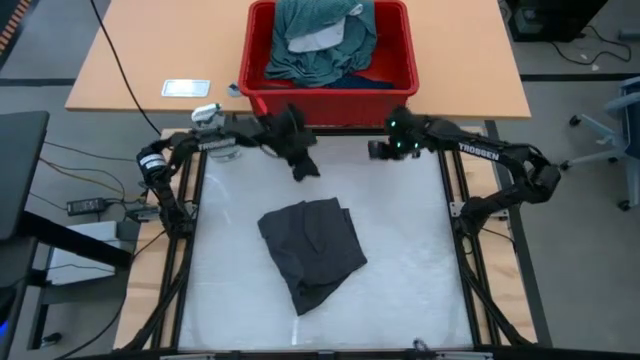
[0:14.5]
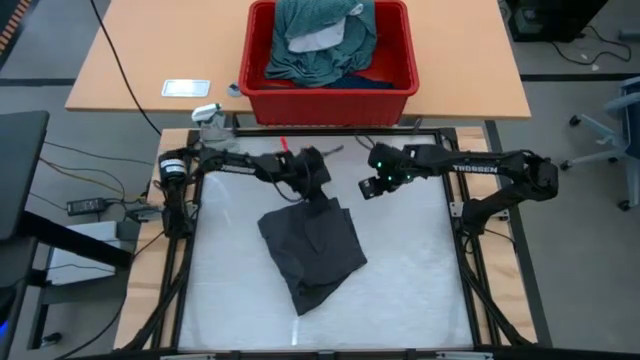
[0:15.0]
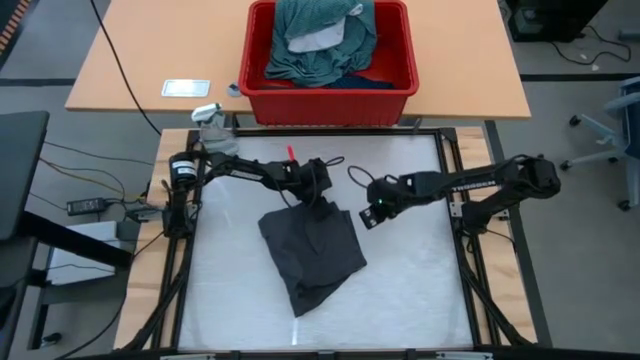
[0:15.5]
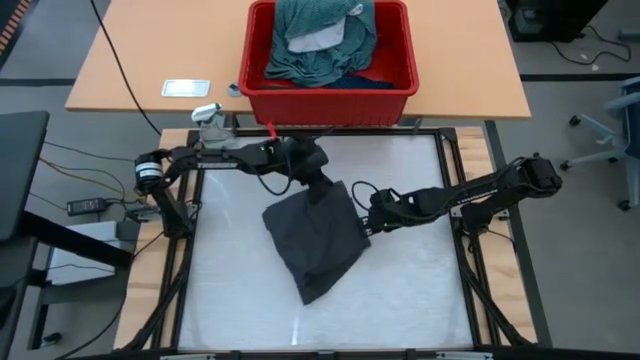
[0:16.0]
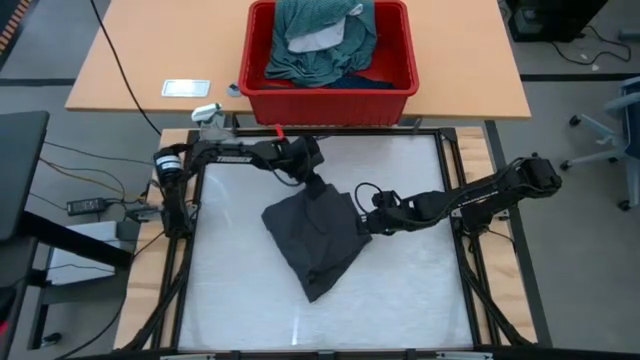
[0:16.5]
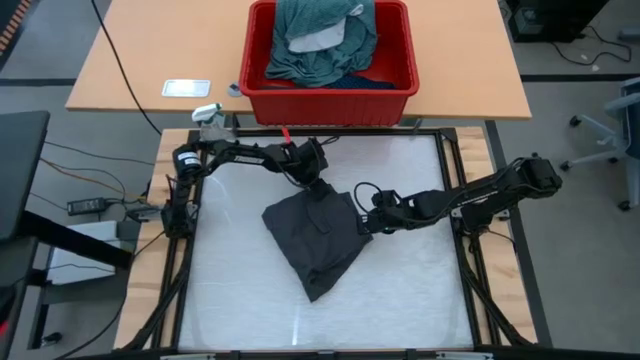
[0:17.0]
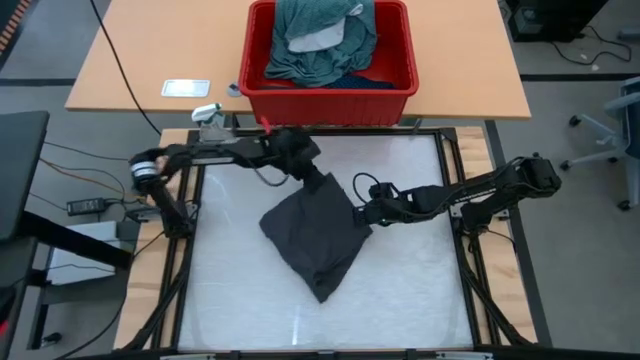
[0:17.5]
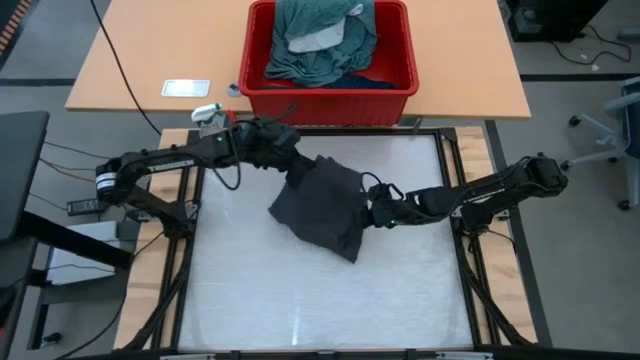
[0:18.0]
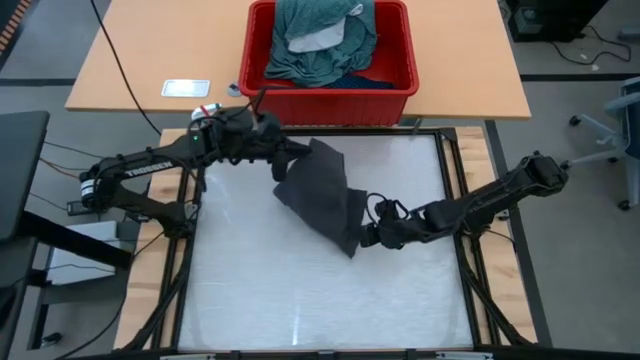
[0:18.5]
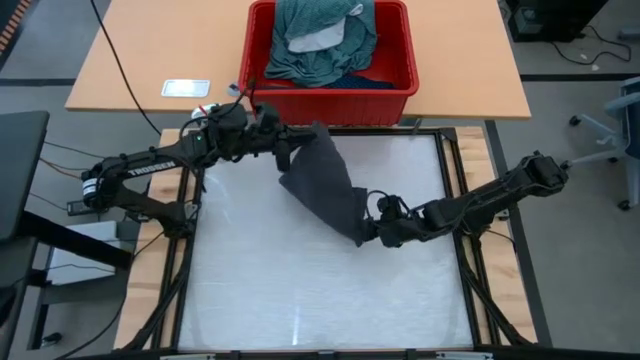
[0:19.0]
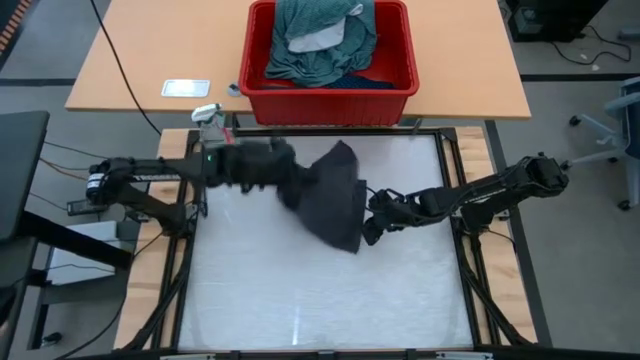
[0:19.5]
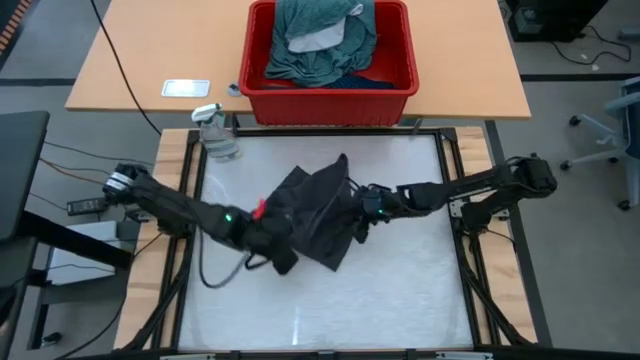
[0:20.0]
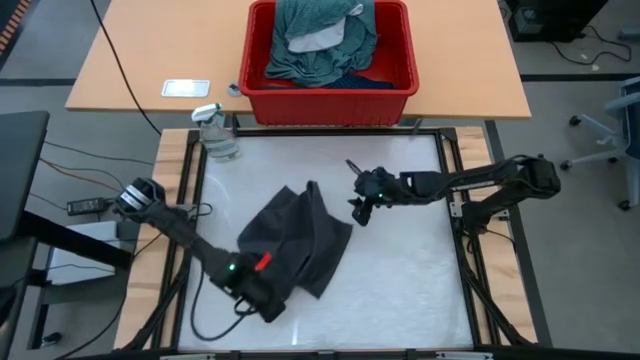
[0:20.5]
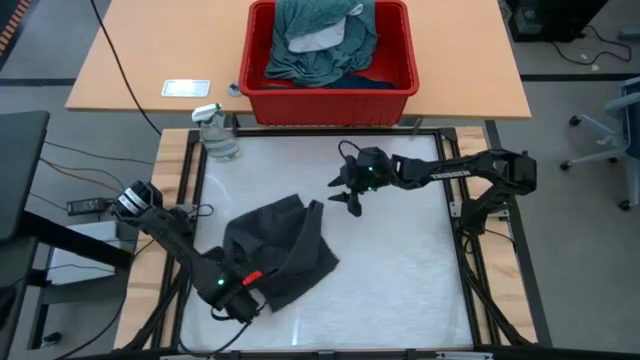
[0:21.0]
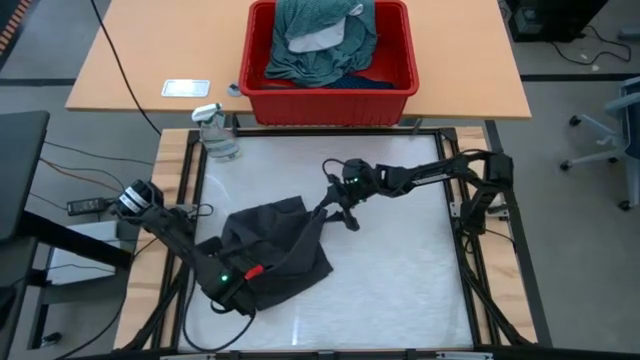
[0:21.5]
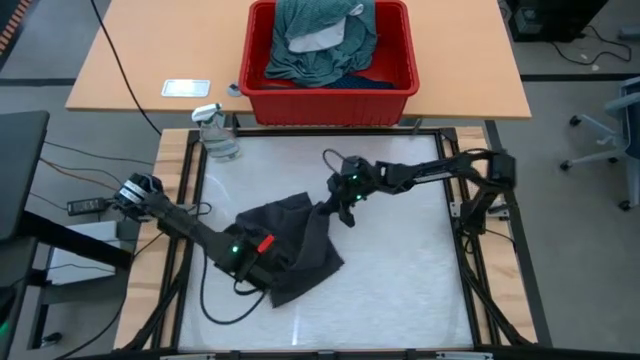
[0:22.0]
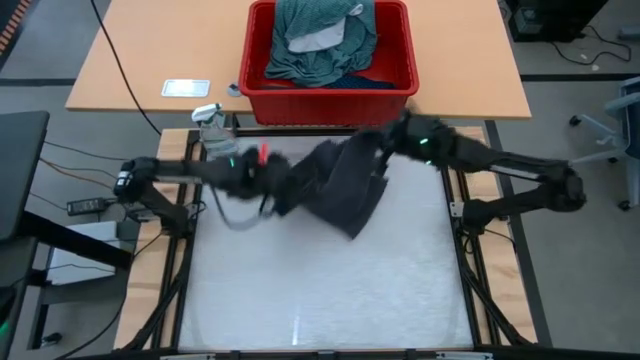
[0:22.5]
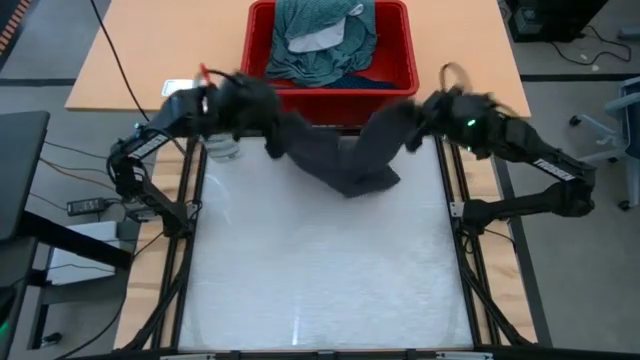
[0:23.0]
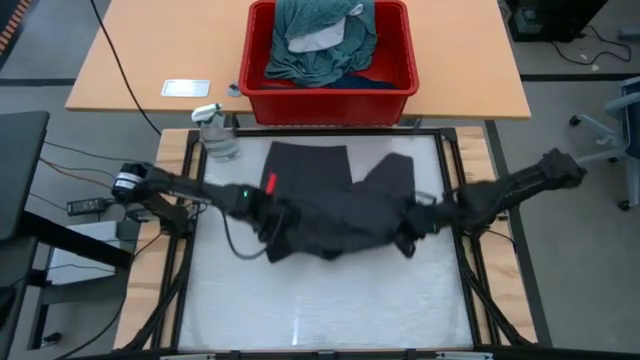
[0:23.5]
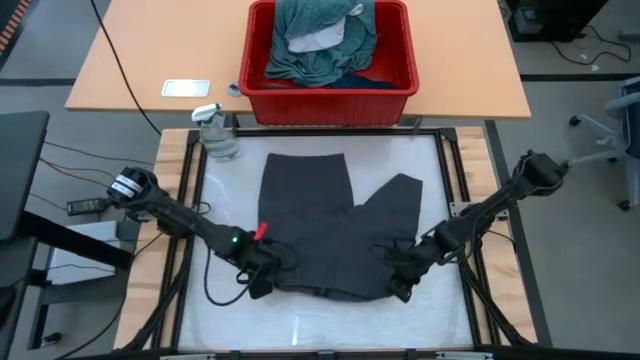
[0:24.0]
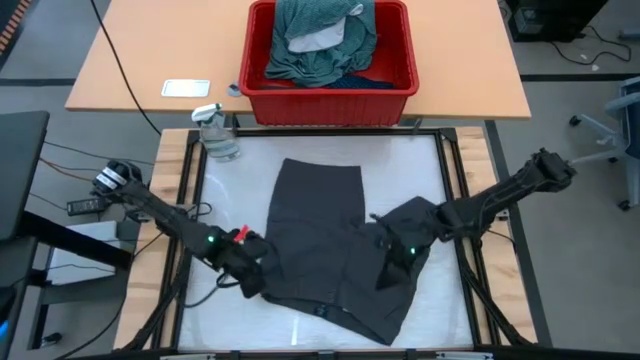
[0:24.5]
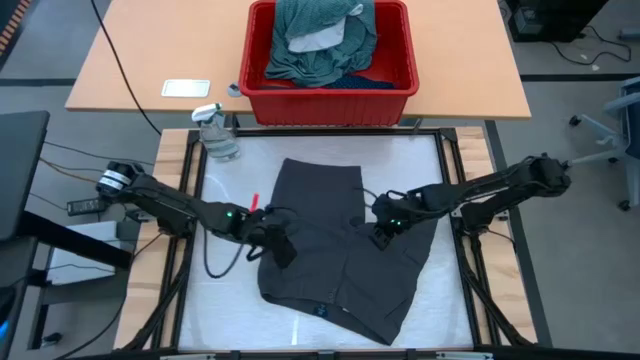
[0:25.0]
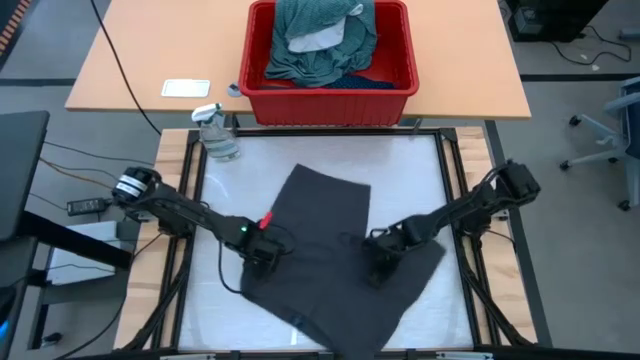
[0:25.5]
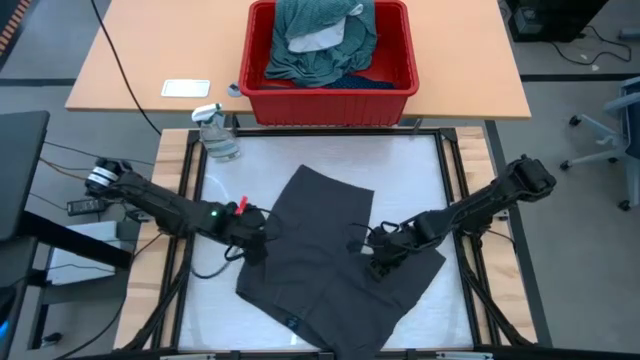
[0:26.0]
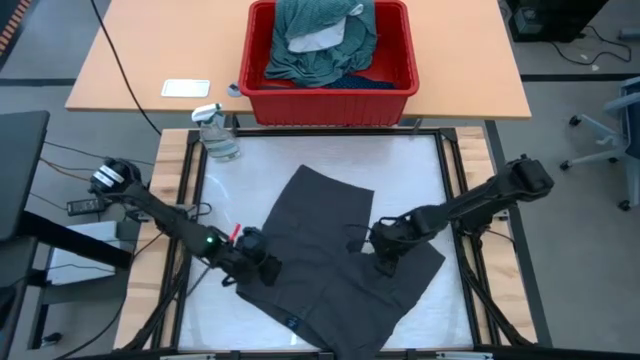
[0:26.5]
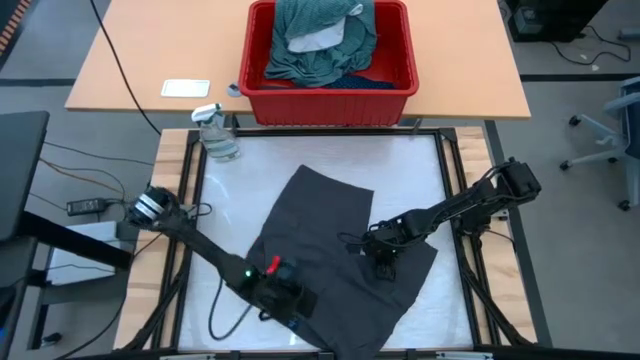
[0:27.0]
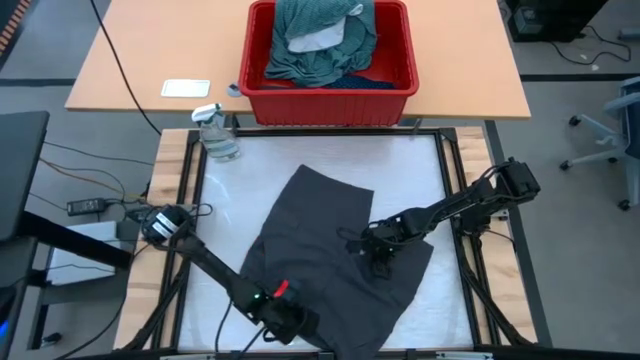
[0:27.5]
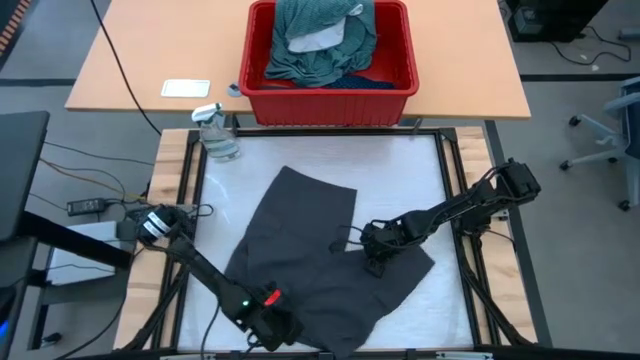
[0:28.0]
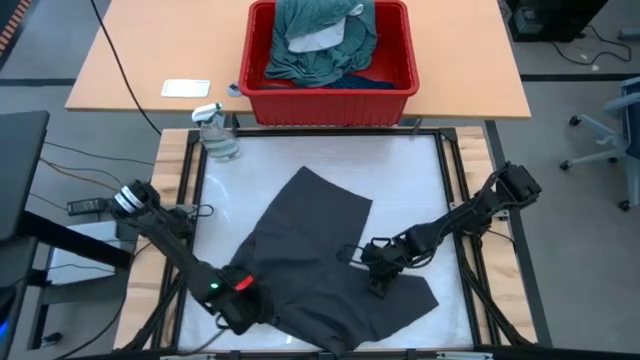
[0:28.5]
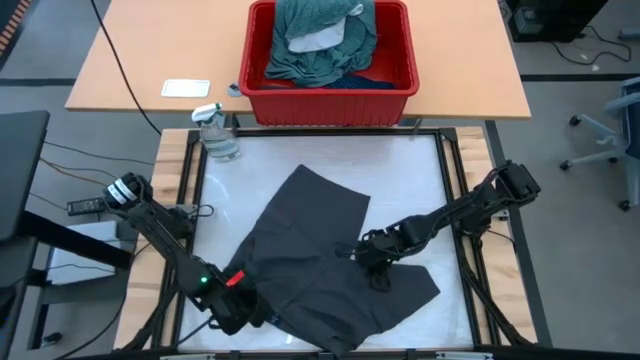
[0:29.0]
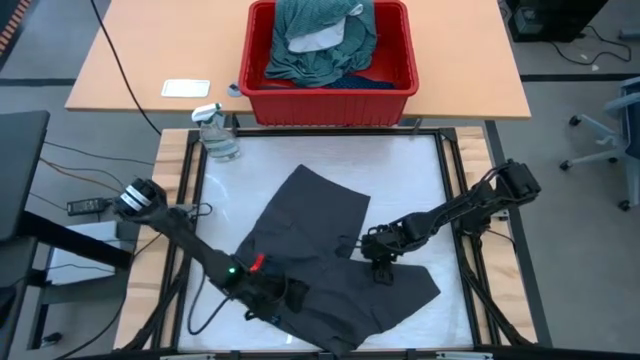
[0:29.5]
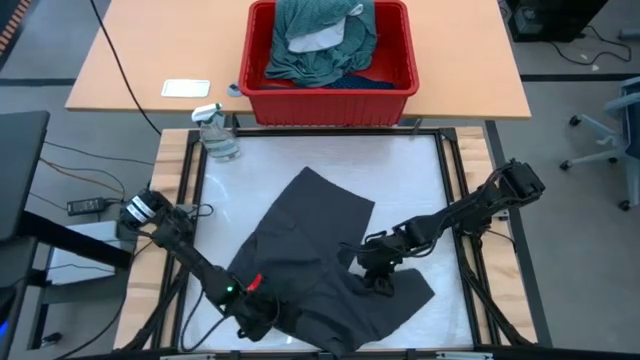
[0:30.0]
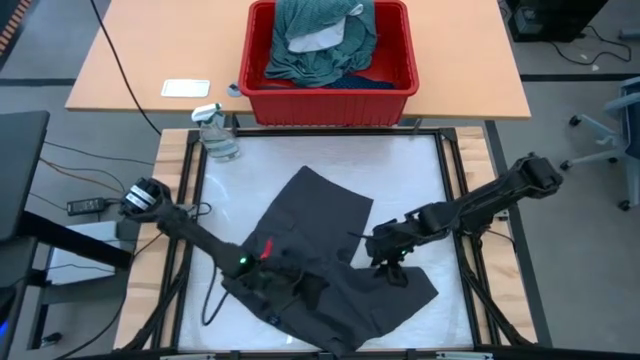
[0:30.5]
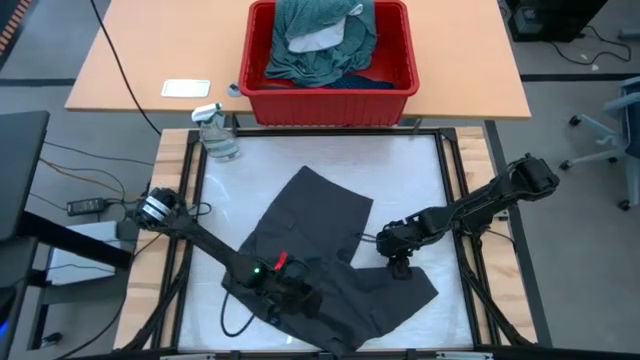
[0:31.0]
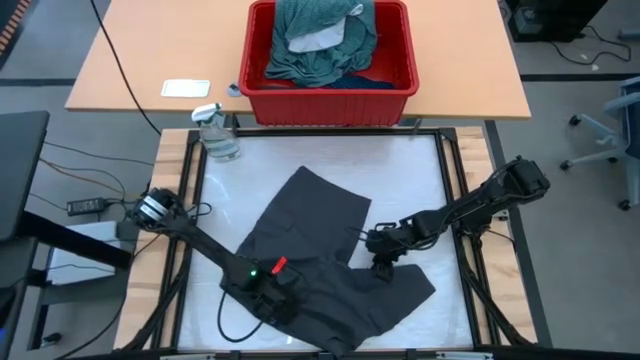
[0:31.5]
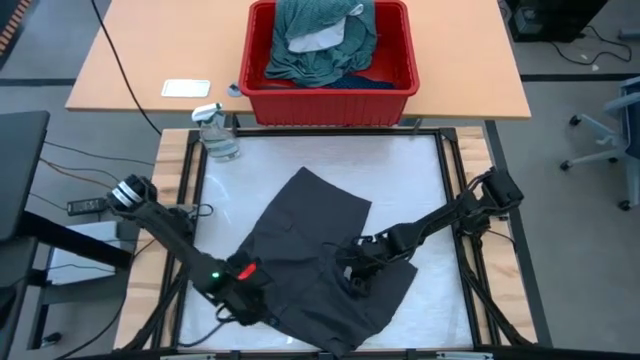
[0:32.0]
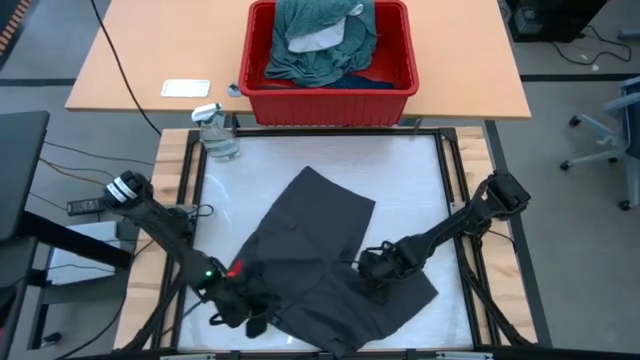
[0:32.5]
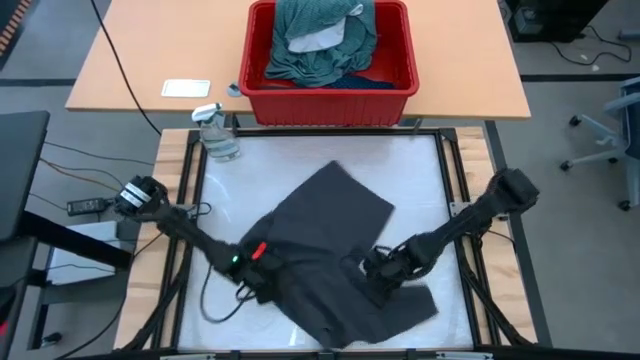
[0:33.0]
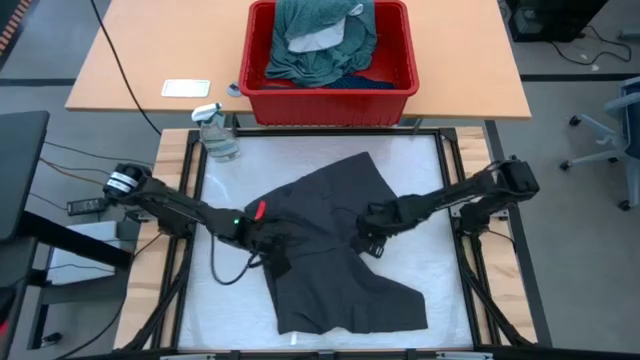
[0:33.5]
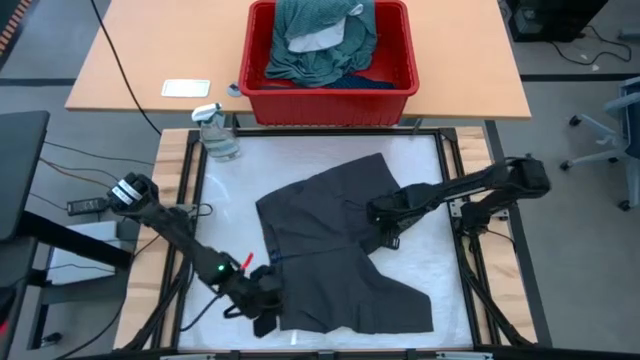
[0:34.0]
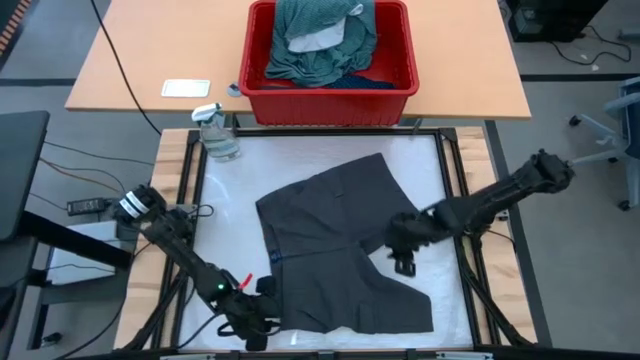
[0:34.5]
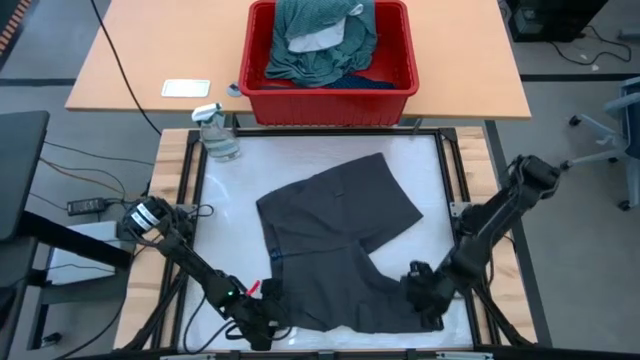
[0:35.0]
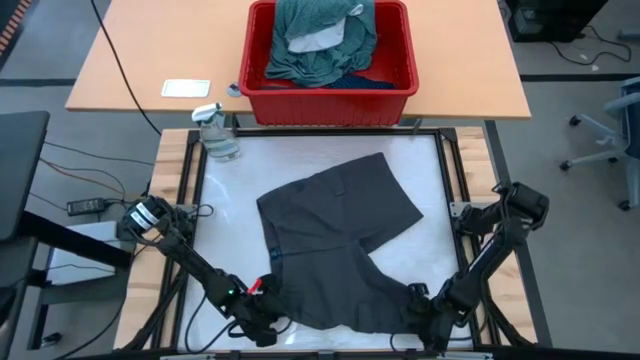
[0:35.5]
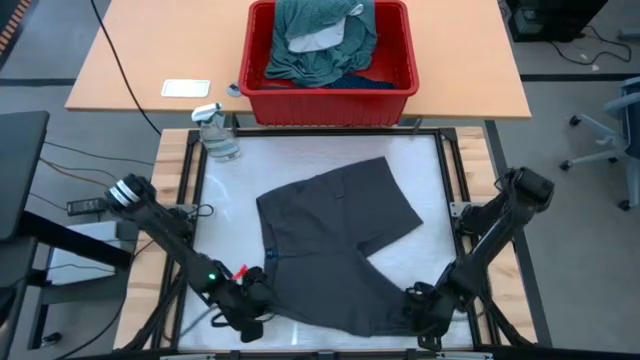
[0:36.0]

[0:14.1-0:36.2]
Task: Fold Laundry from Bin
Fold the gray short on the table
